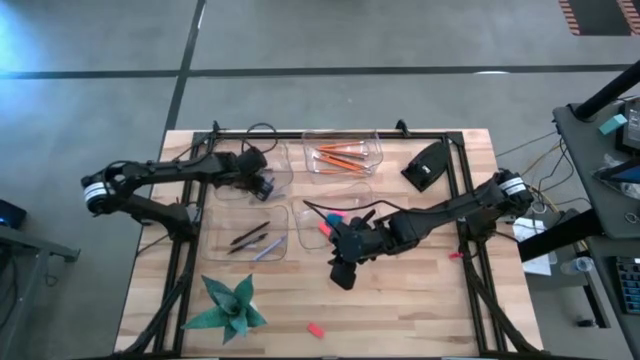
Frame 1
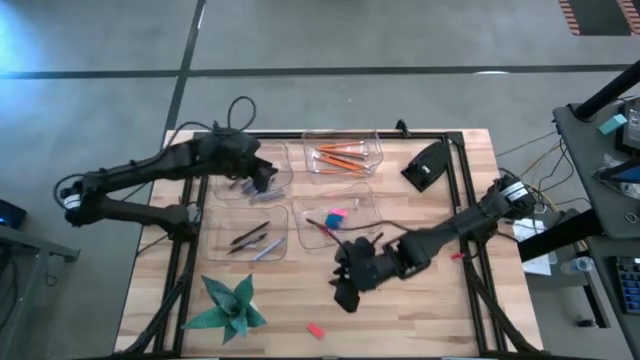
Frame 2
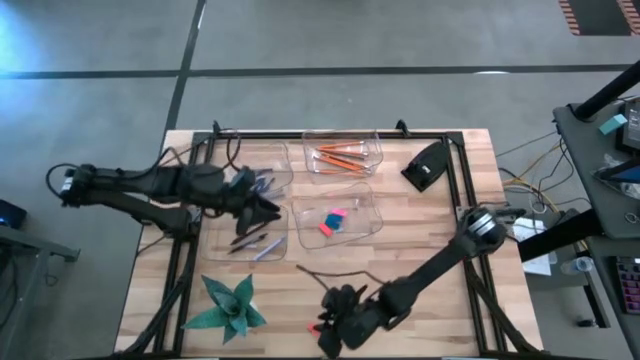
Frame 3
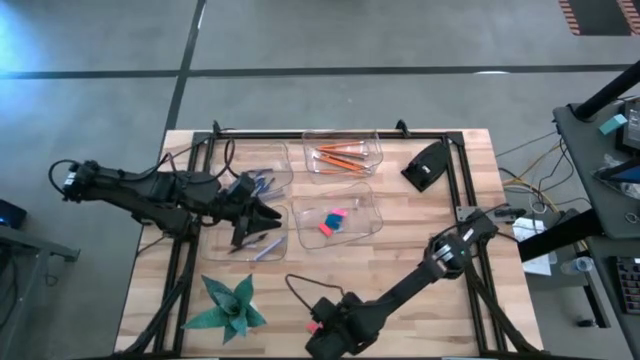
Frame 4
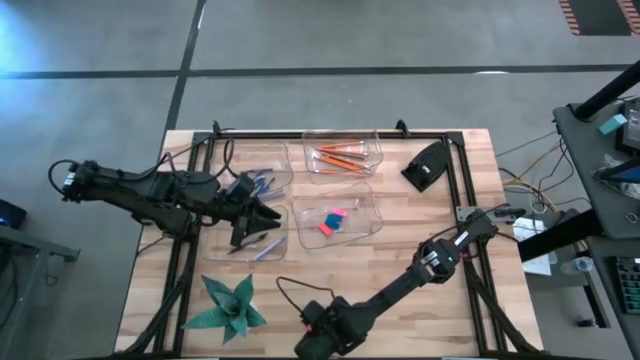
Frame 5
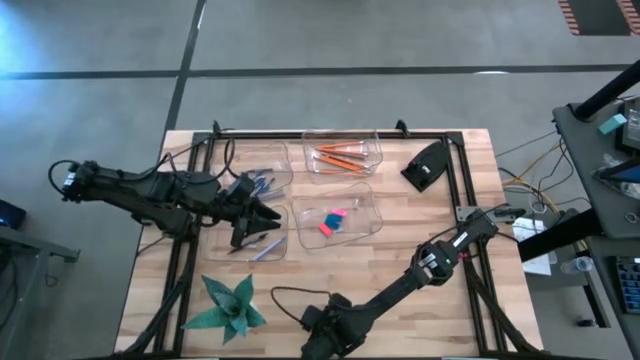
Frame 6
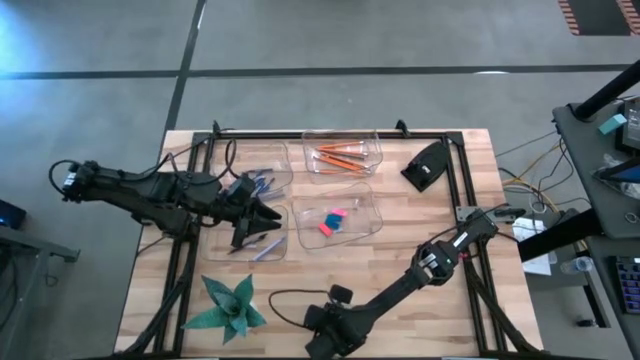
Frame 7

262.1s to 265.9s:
Task: Sort crayons/erasers/pens/pencils in bins
Put the orange eraser into the bottom right transparent bin

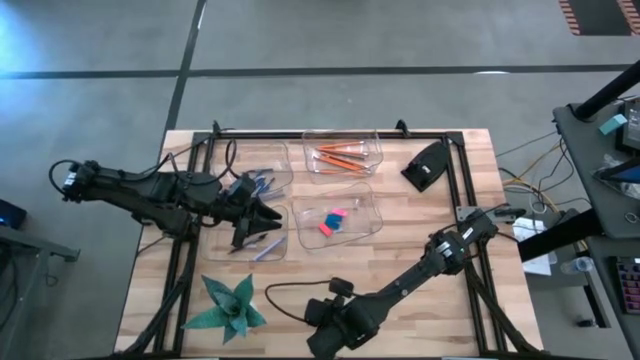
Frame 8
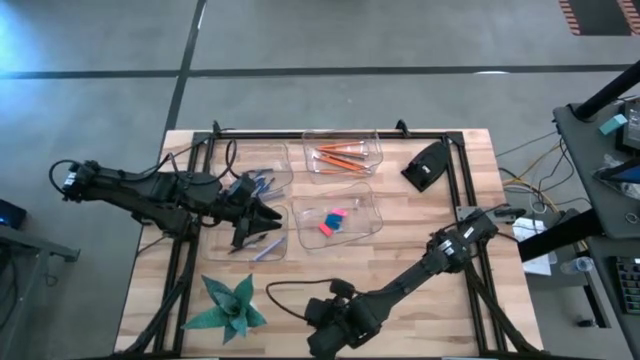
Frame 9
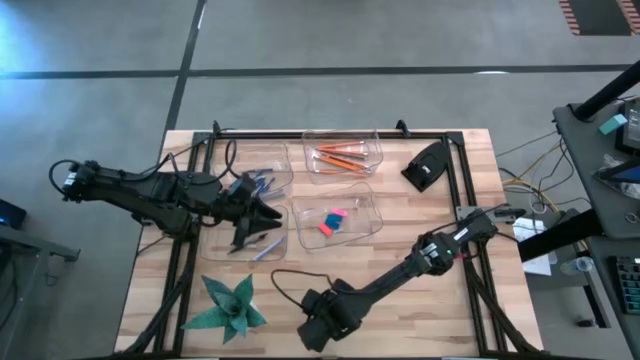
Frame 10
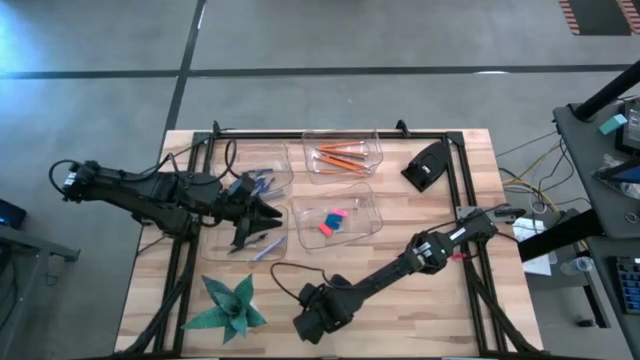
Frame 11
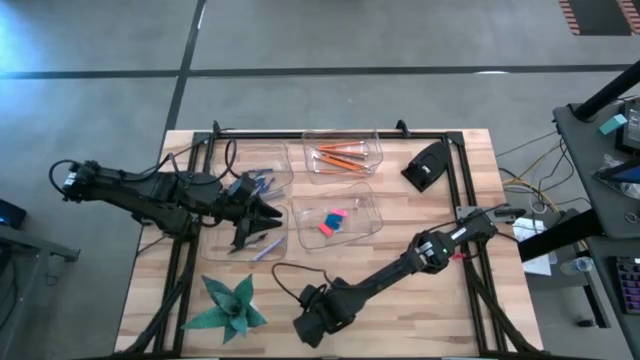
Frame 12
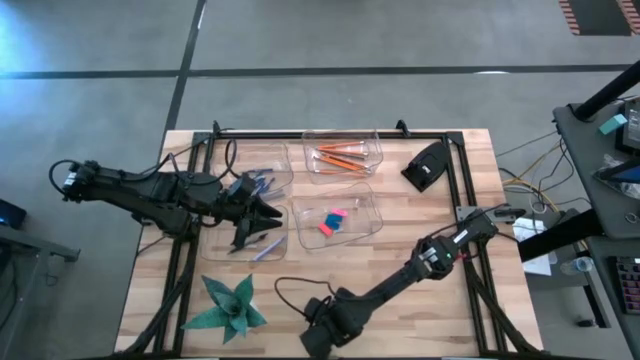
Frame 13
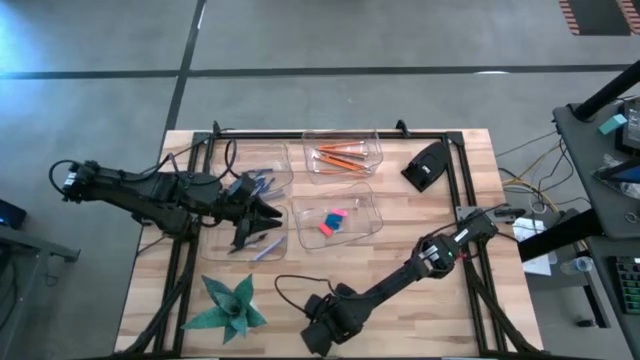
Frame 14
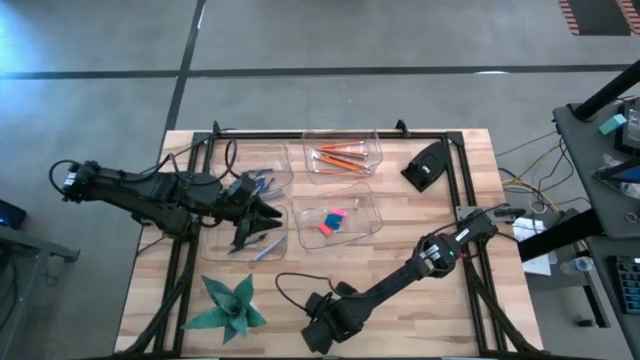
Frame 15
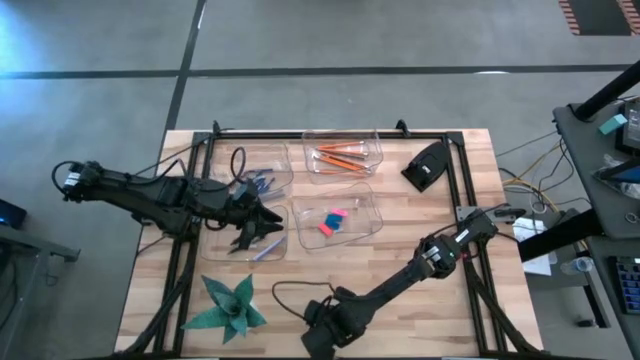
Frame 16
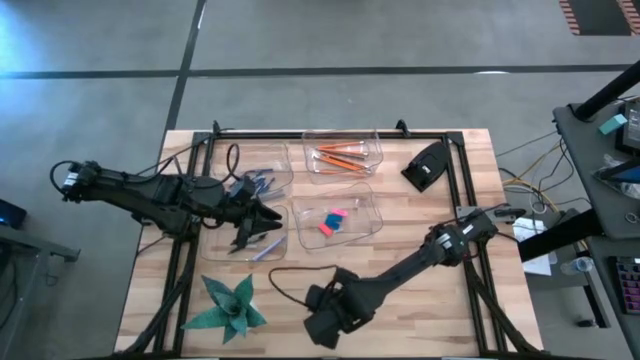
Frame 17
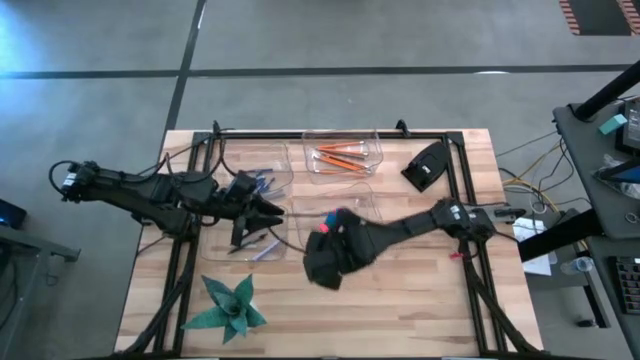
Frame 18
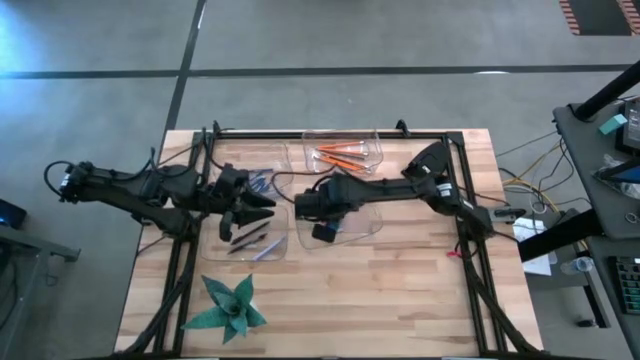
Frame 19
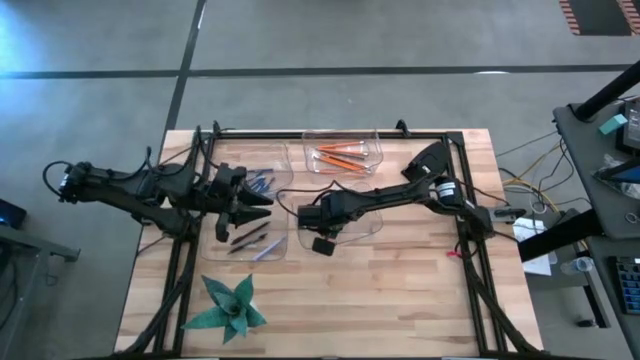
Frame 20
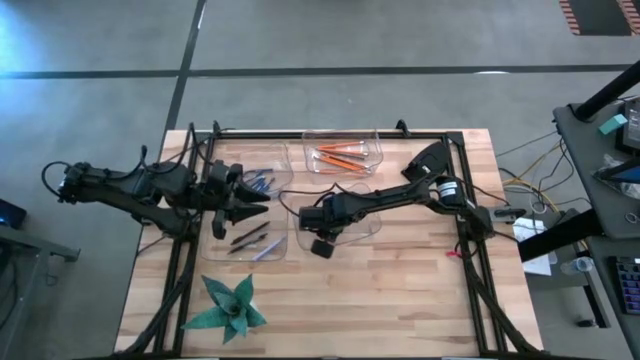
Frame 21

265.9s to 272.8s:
Put the orange eraser into the bottom right transparent bin

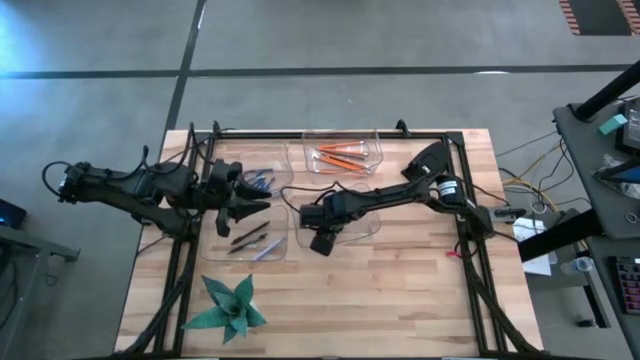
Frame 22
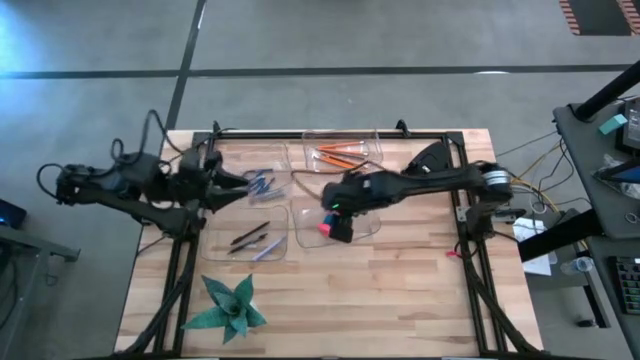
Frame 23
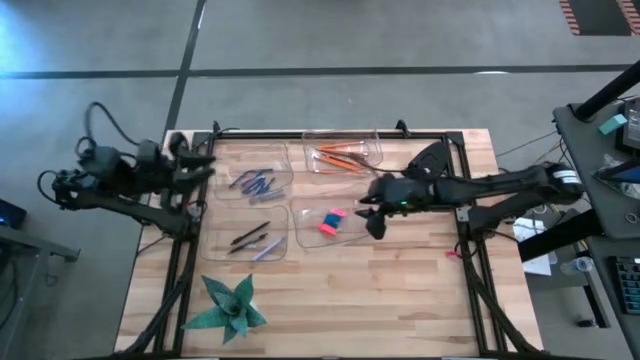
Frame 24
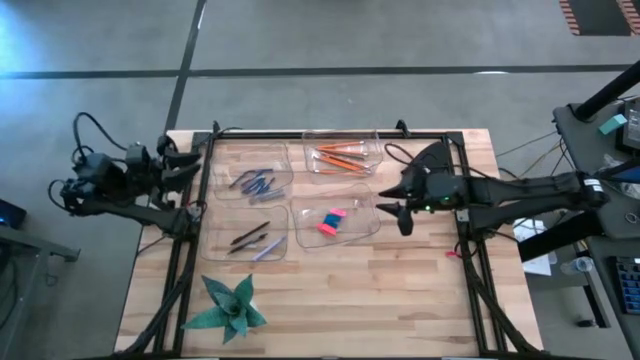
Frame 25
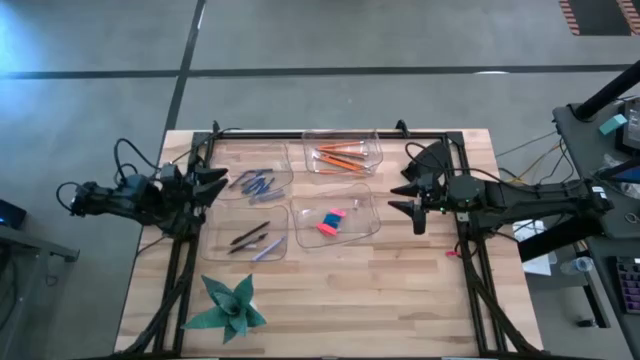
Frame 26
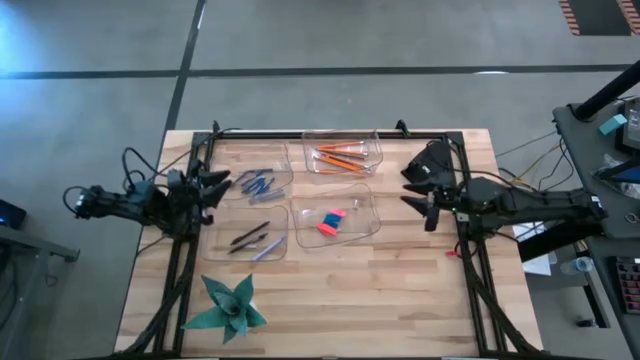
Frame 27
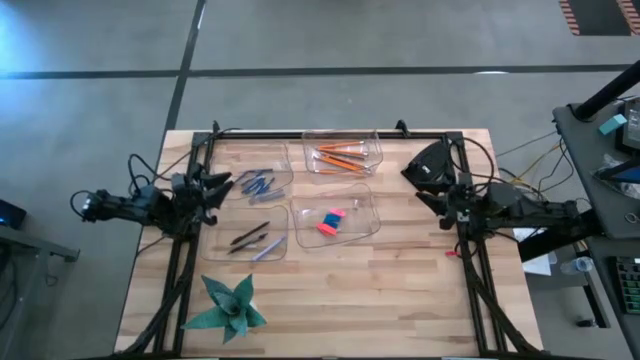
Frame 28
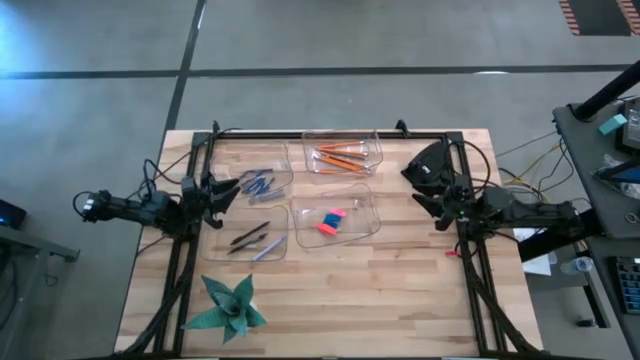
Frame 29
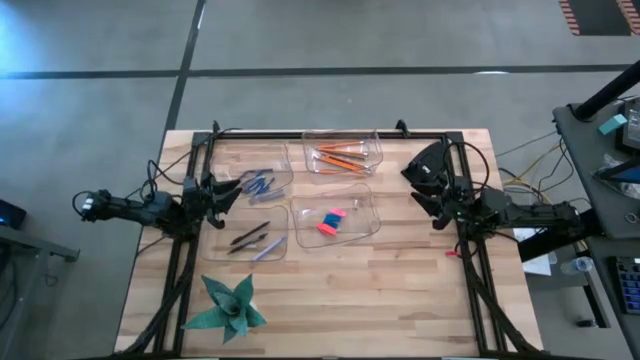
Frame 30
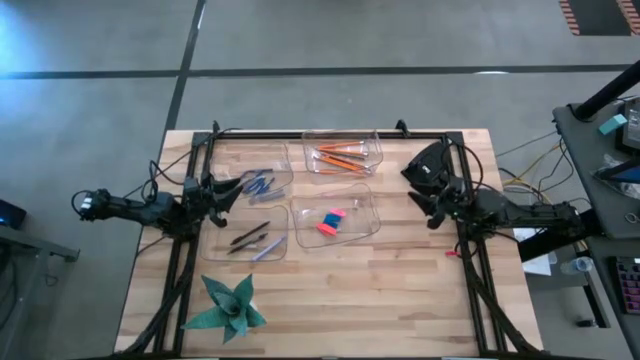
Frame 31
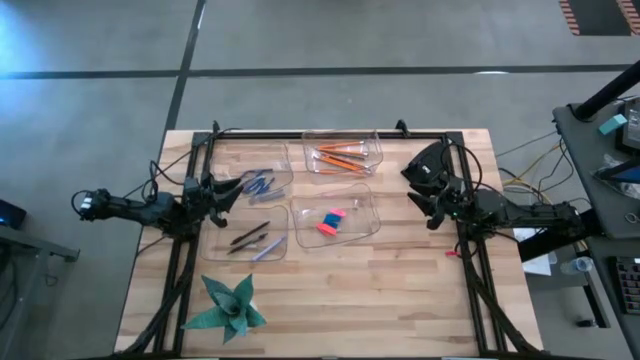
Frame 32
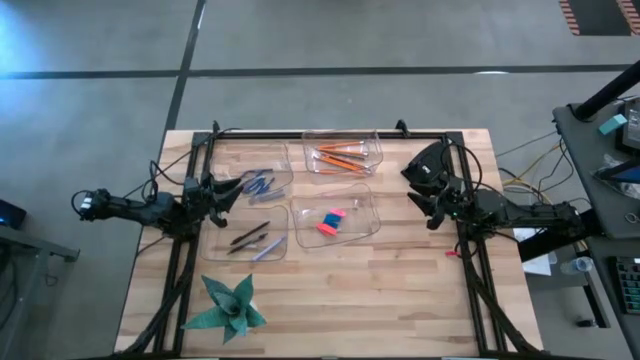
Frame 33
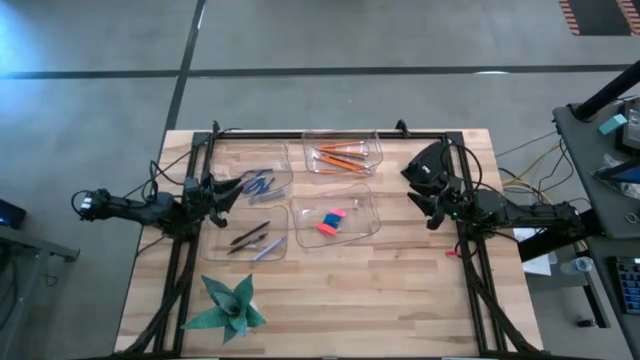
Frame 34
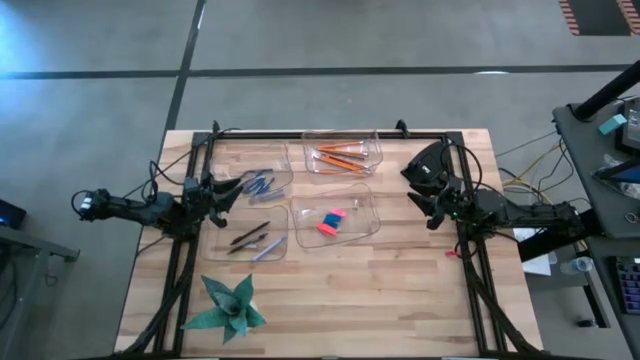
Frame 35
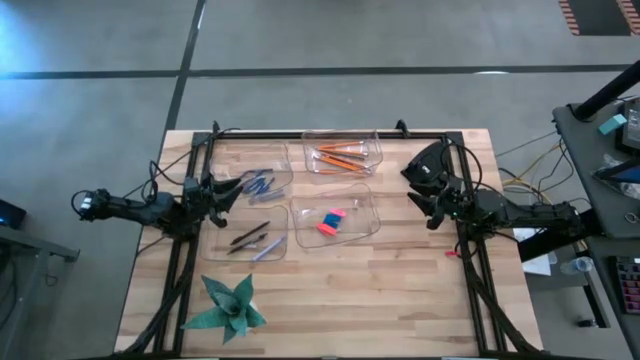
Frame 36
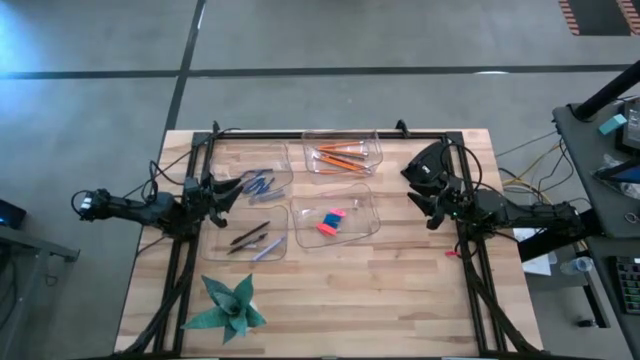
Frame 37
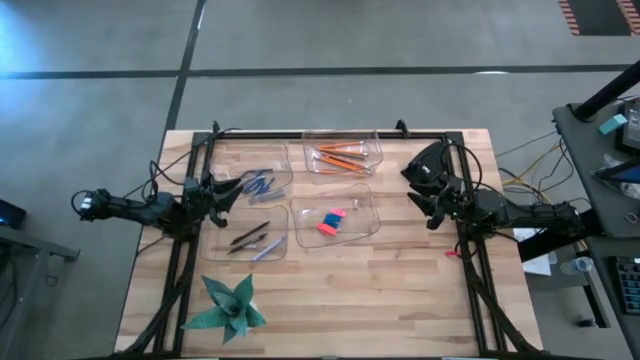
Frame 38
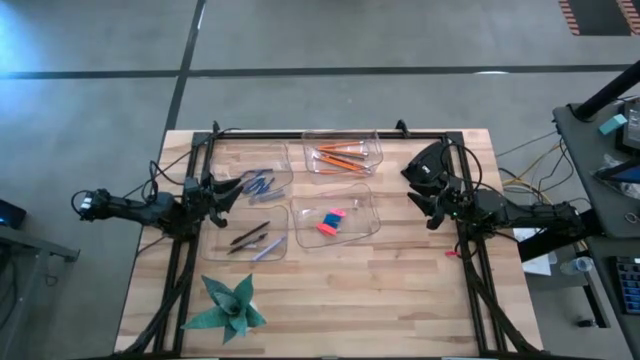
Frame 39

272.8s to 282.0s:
Return to Home Position

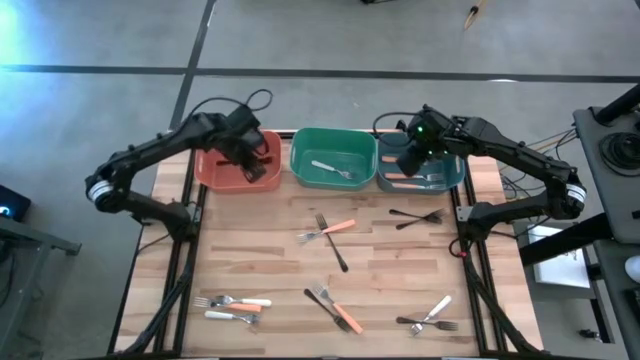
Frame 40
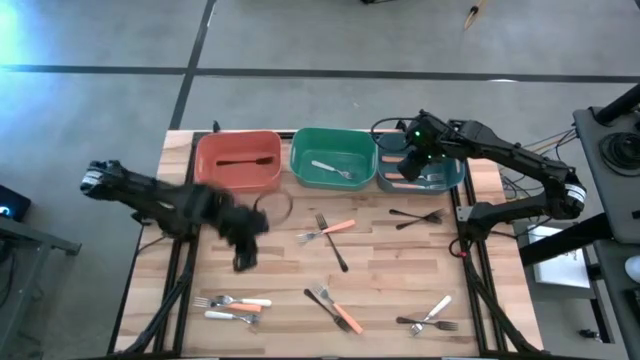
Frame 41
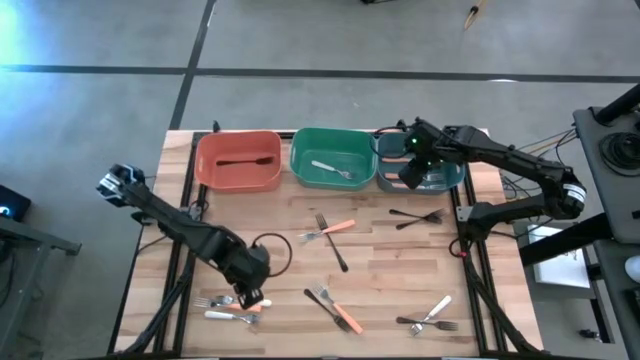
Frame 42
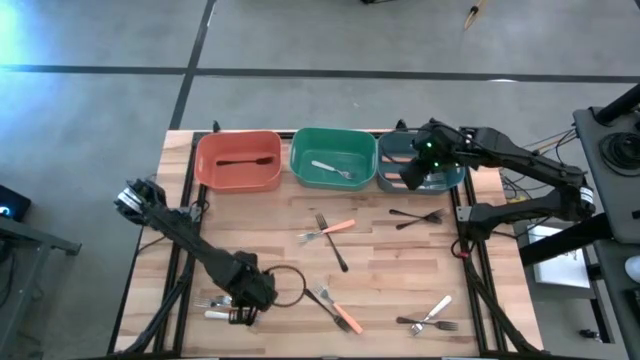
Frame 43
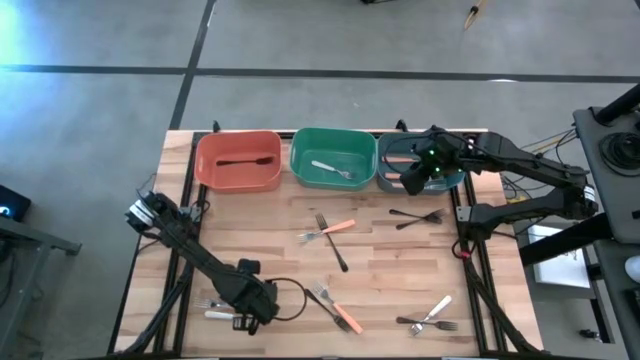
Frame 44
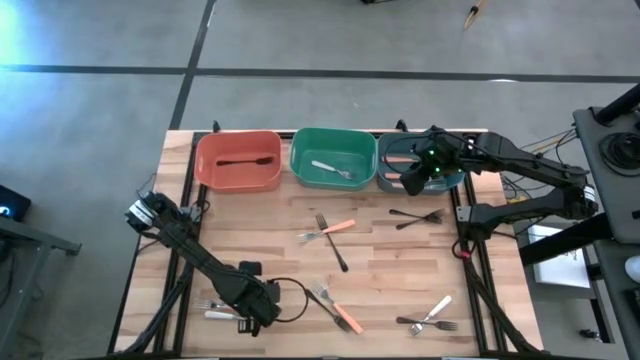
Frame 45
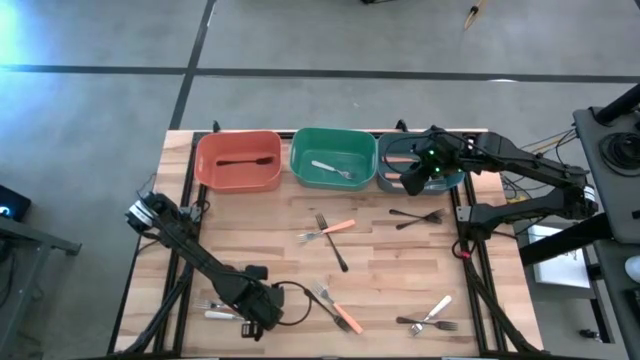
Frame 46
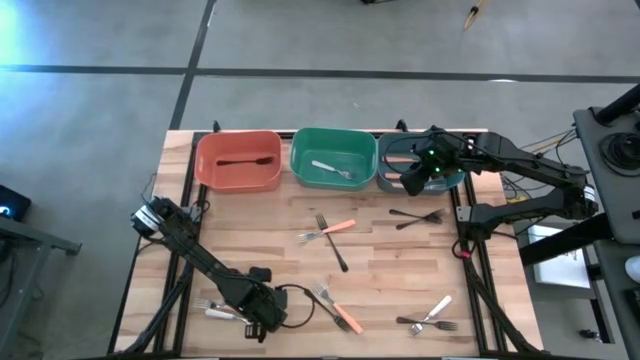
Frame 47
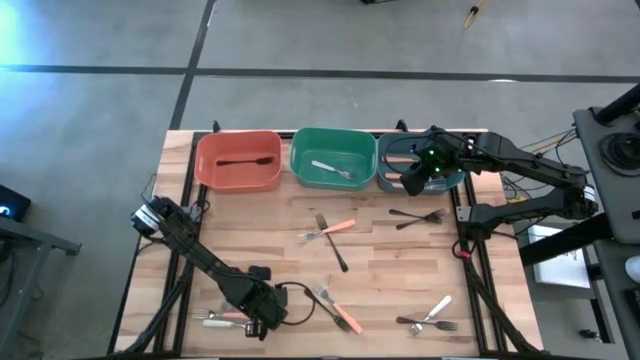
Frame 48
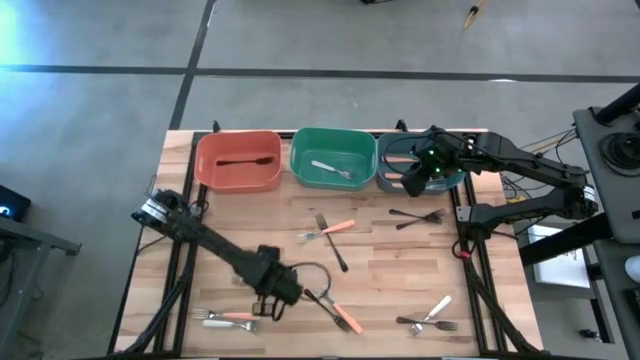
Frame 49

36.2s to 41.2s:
Task: Sort silverware by color (type)
Put the white fork into the green bin
